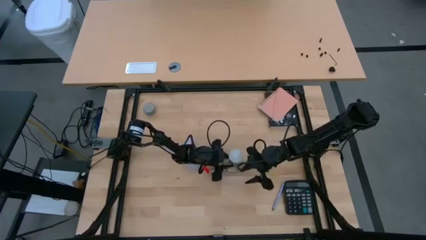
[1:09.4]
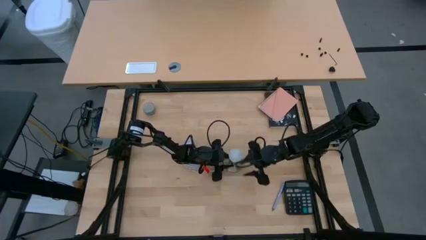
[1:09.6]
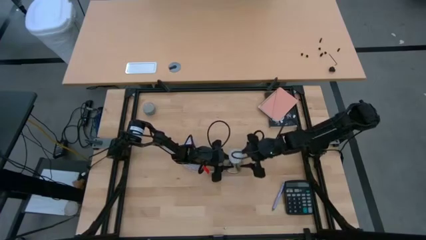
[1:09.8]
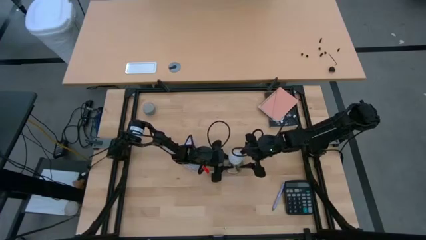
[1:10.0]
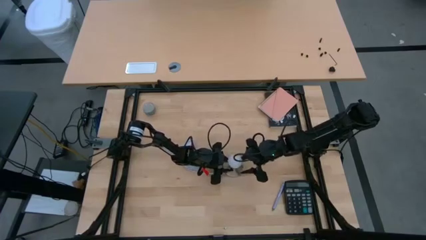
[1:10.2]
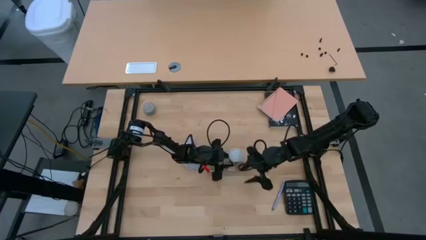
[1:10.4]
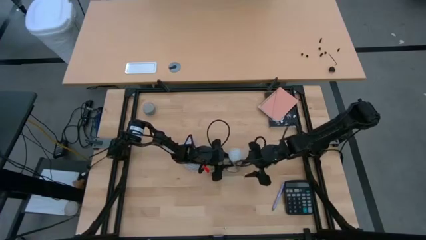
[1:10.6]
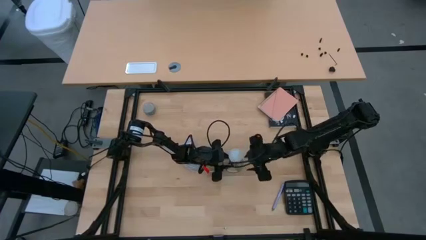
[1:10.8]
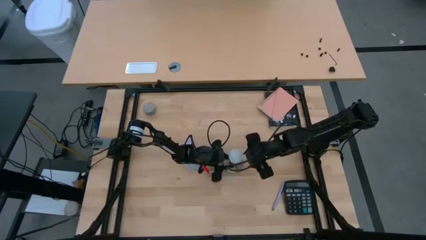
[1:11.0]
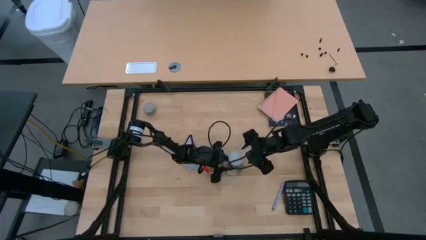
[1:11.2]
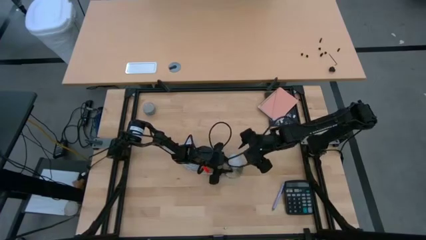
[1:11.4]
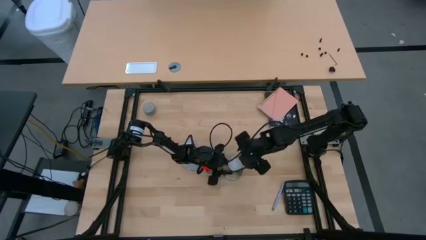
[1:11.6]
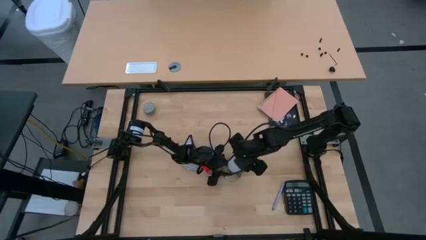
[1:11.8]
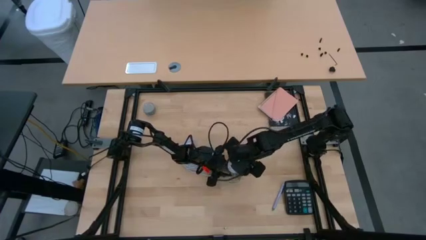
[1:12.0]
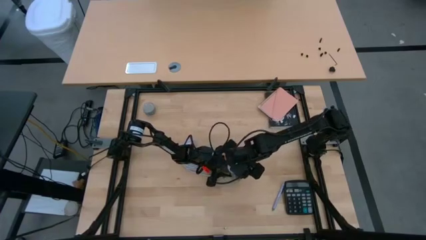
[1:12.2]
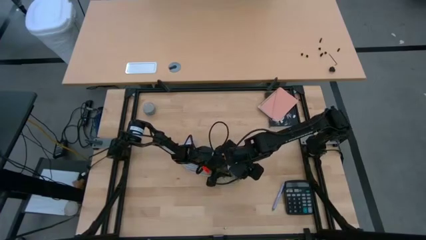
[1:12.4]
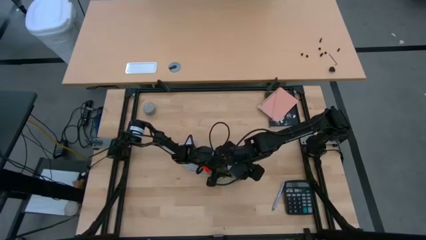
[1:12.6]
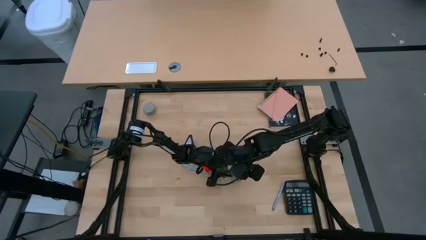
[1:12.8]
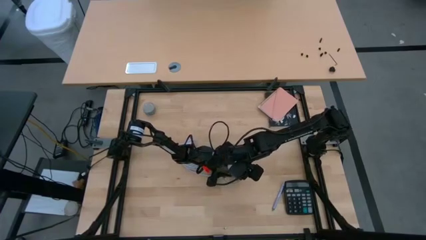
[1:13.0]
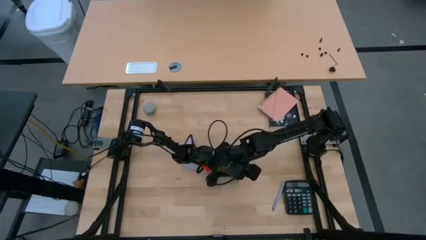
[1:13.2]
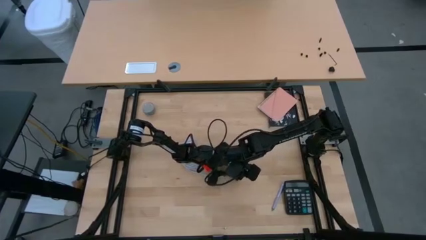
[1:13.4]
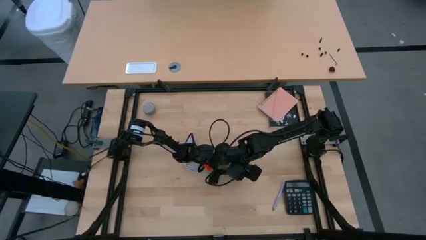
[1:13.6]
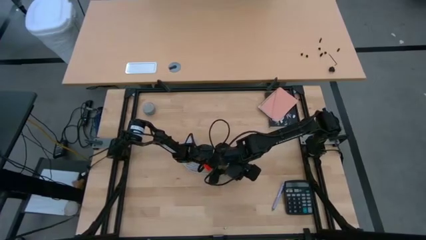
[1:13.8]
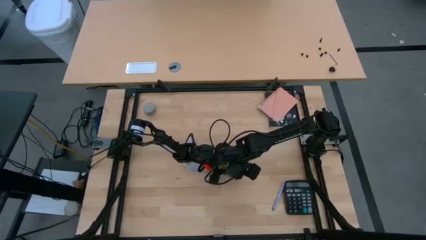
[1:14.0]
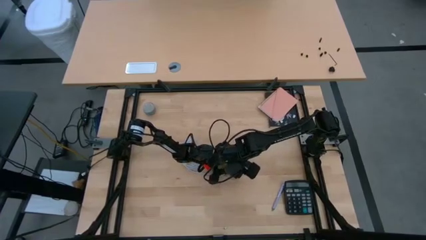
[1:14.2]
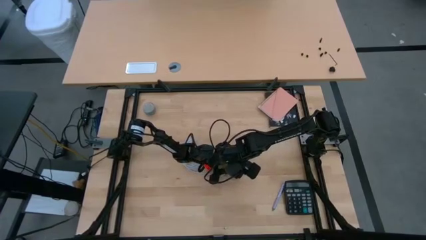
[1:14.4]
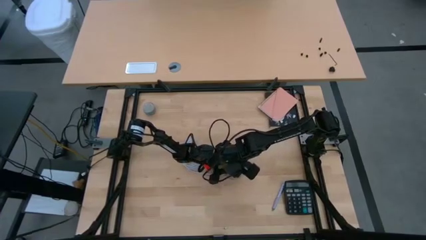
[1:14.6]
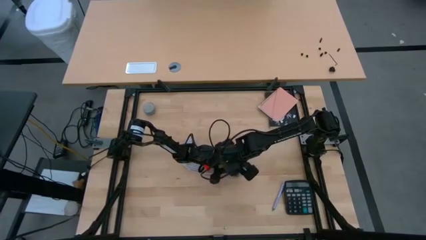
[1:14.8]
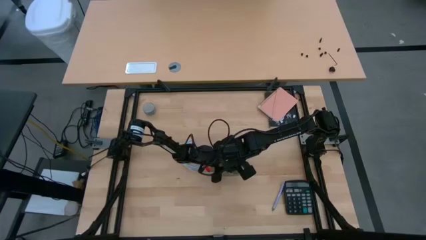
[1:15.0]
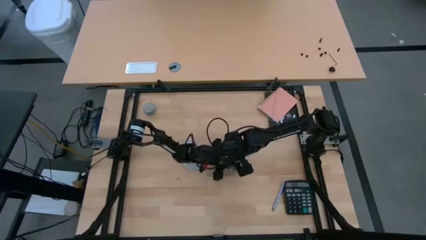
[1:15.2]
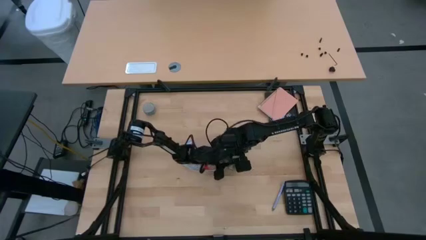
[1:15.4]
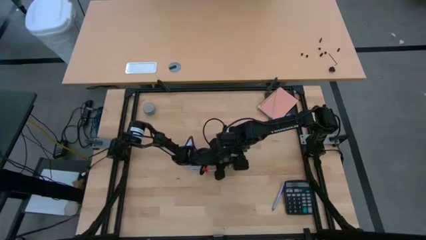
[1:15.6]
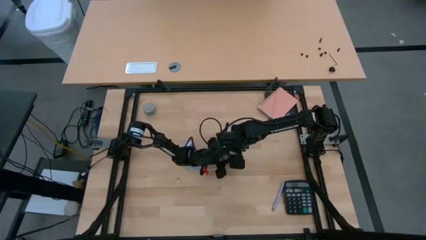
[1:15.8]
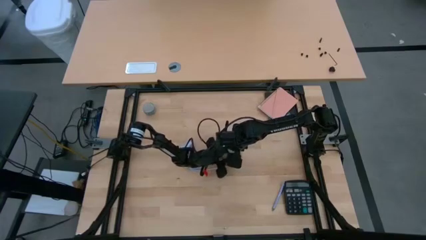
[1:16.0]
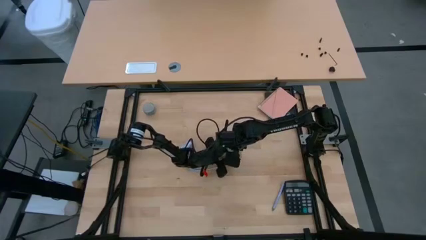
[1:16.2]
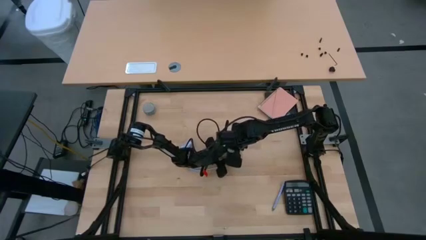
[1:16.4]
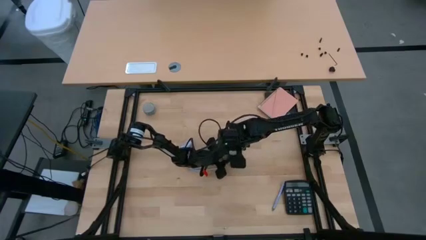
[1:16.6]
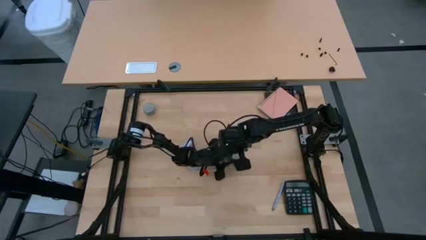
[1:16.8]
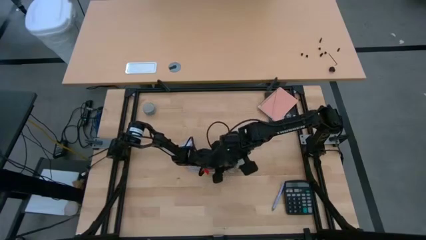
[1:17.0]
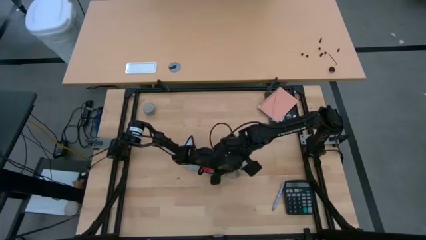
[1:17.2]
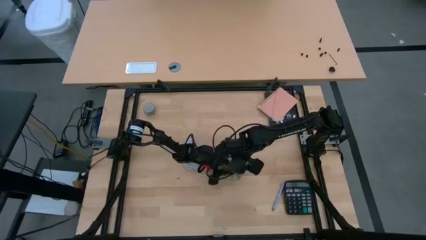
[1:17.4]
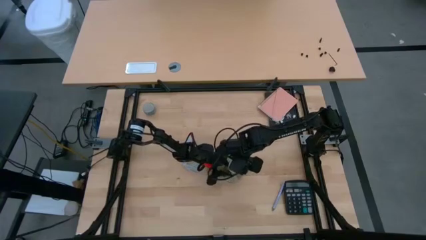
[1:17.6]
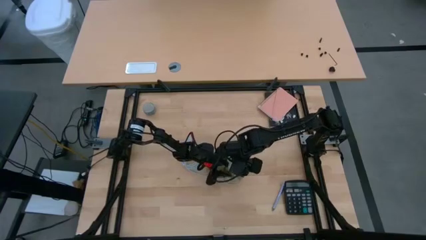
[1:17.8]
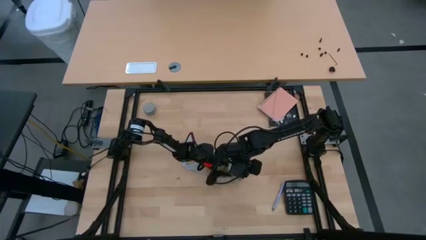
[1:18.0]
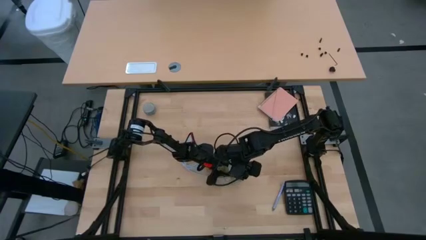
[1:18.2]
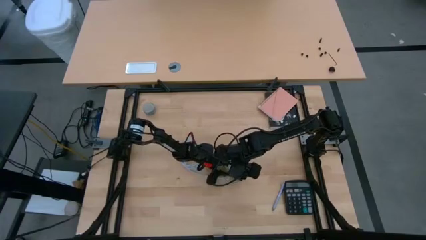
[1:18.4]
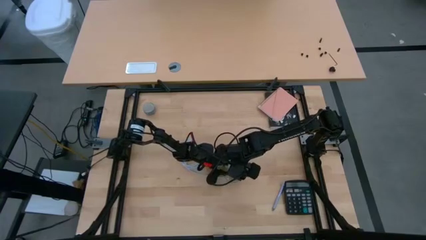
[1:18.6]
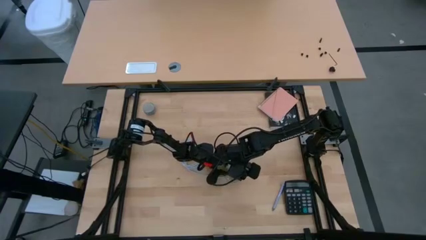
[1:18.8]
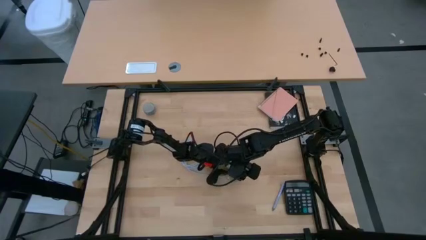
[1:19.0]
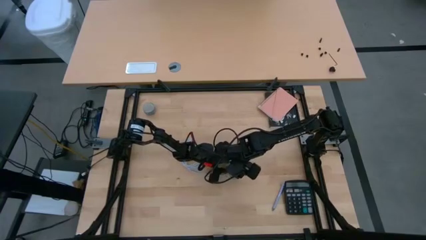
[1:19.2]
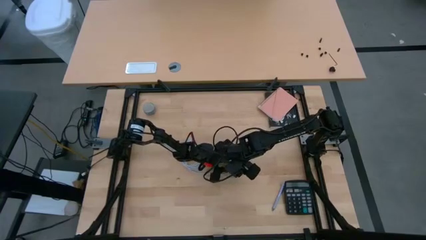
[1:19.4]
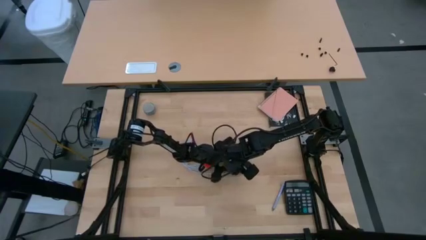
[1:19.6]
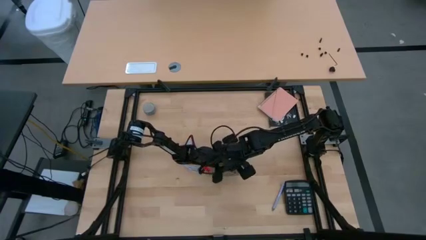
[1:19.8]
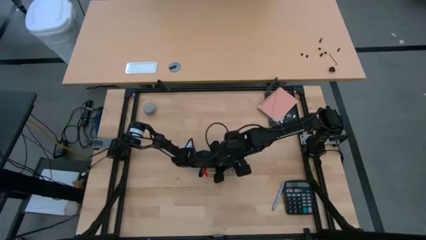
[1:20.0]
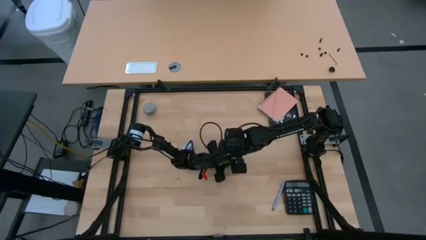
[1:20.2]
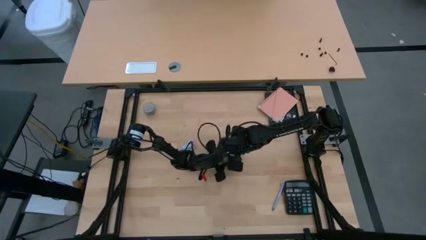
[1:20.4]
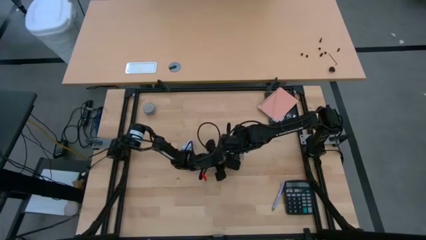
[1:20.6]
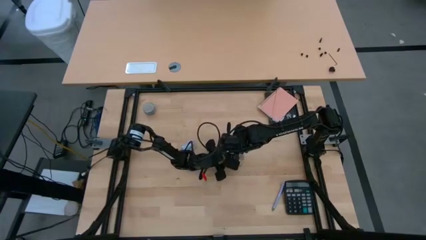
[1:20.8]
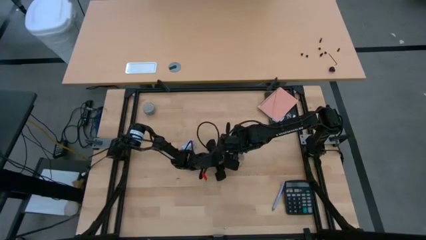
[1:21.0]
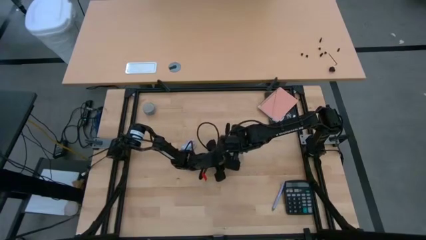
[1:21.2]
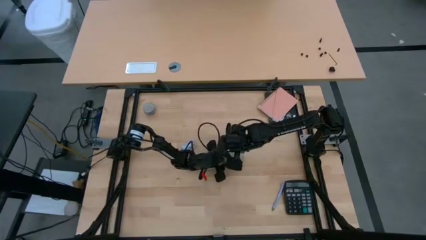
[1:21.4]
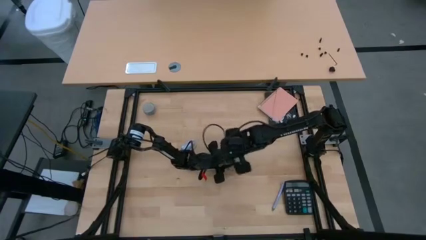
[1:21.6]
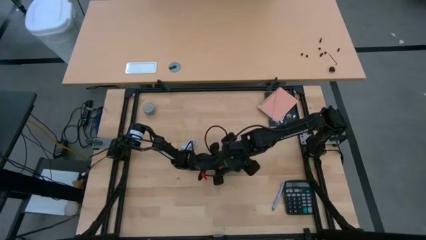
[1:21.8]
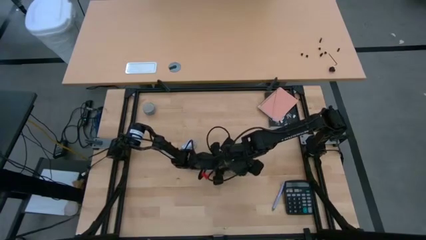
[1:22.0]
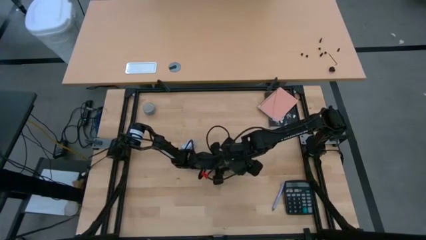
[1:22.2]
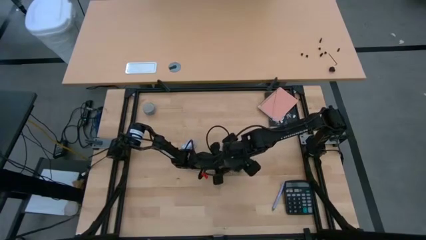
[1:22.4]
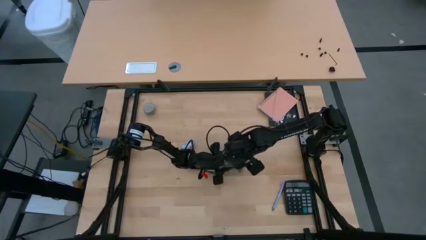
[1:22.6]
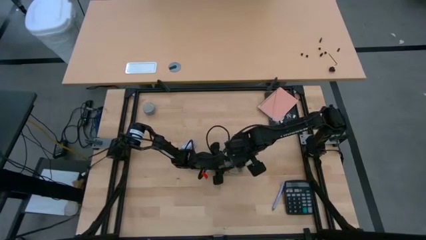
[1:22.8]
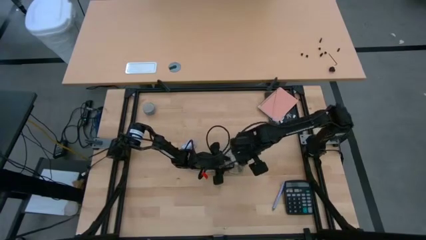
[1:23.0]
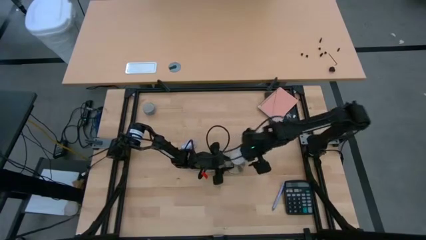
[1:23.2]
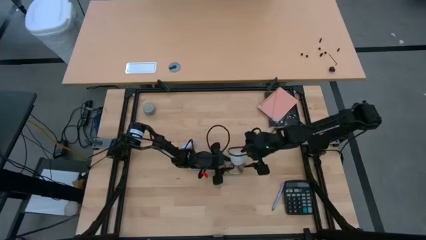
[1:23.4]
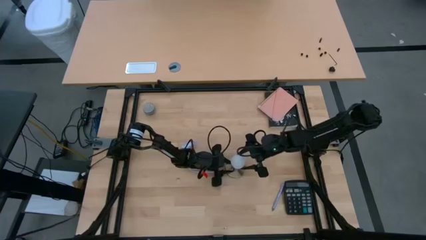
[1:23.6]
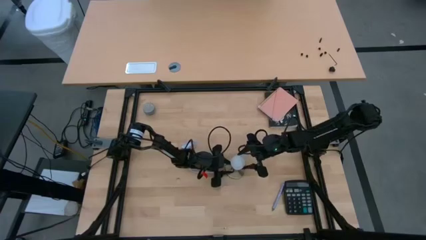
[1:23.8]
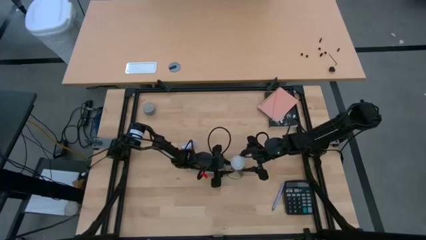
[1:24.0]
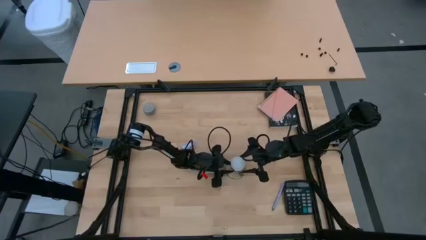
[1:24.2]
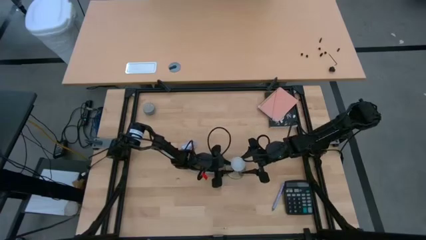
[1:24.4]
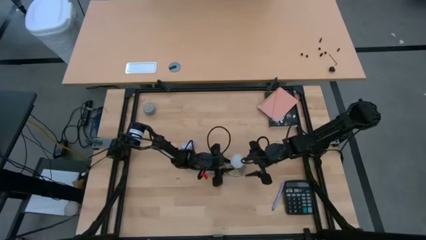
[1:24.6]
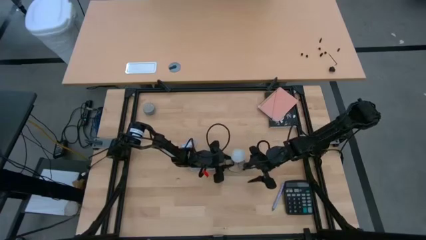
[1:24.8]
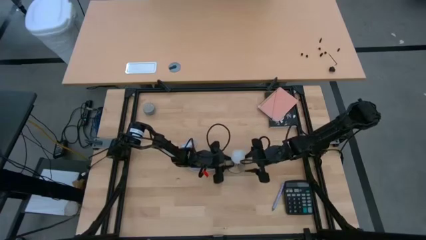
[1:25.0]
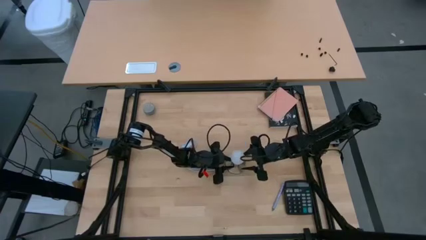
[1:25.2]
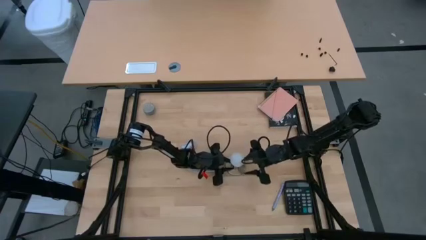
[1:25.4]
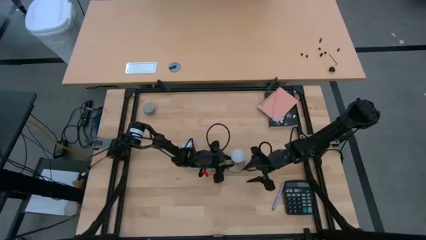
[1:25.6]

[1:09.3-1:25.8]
Task: Screw lightbulb
Insert the lightbulb into the lamp
